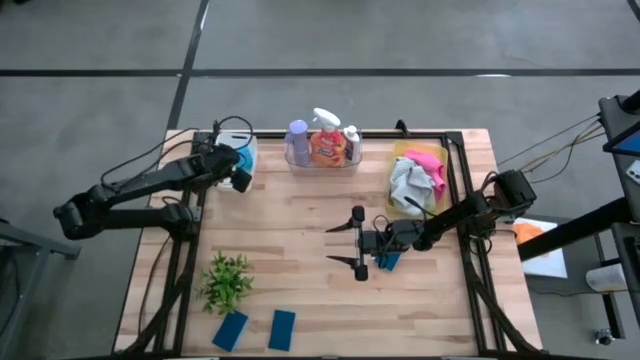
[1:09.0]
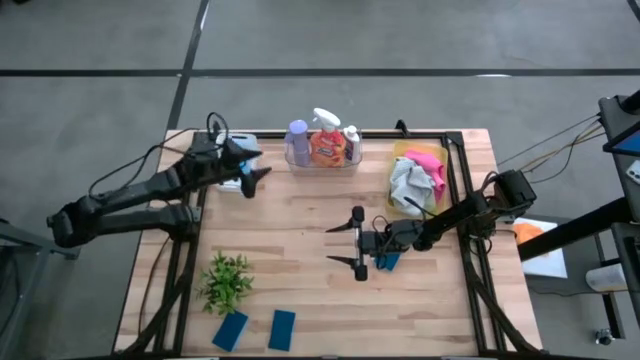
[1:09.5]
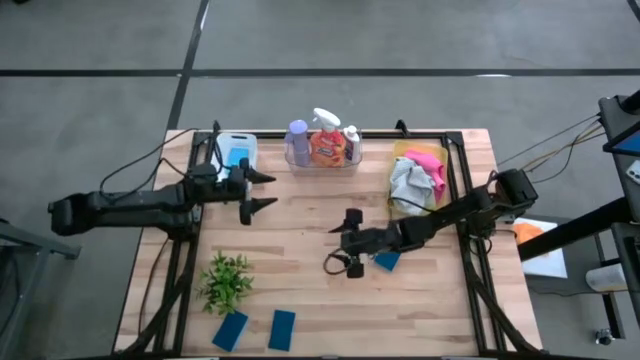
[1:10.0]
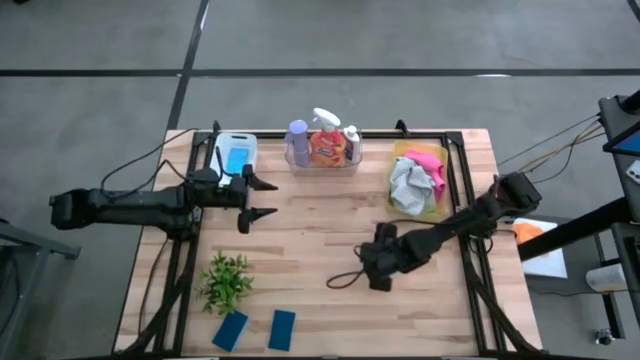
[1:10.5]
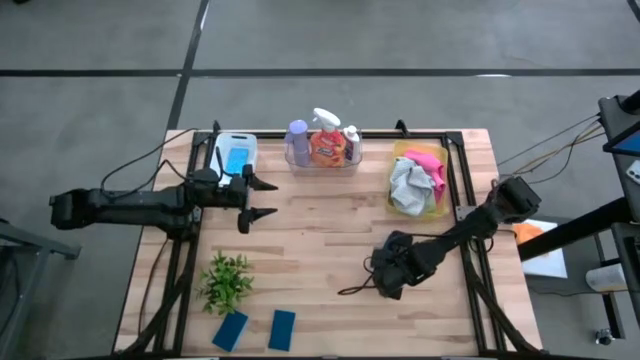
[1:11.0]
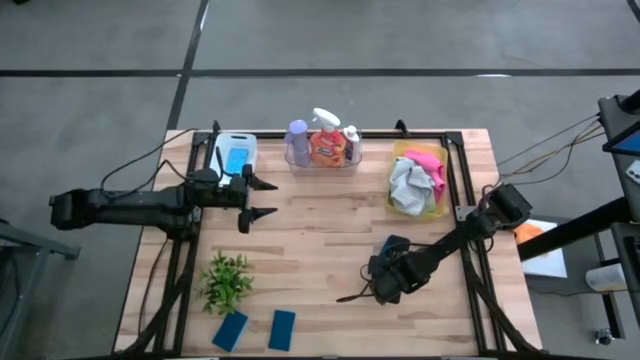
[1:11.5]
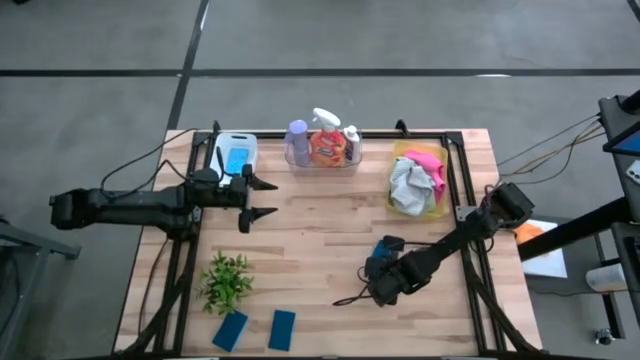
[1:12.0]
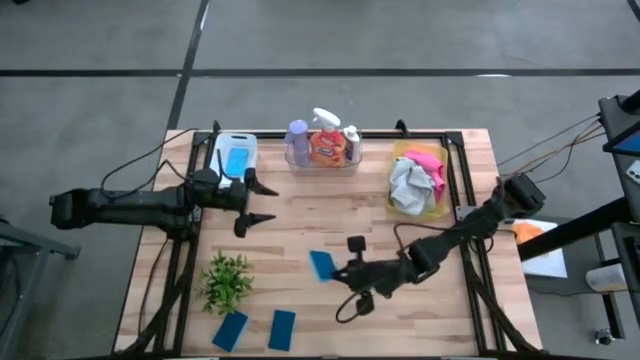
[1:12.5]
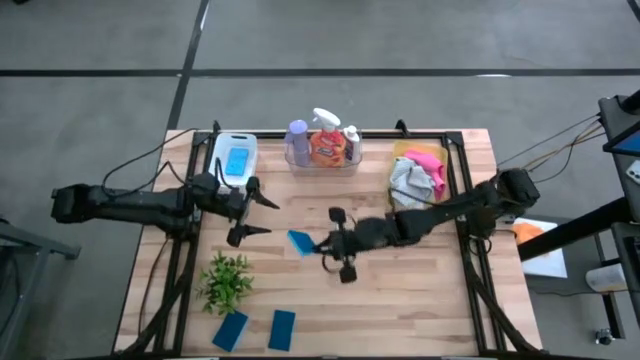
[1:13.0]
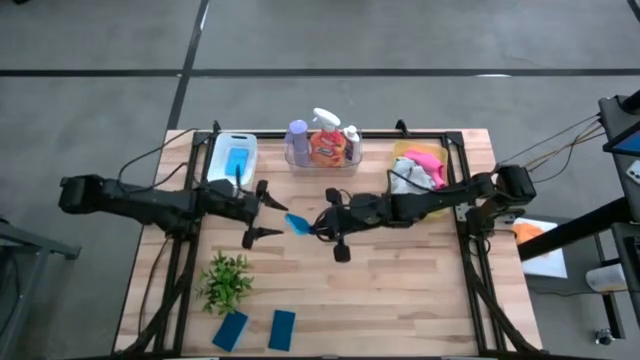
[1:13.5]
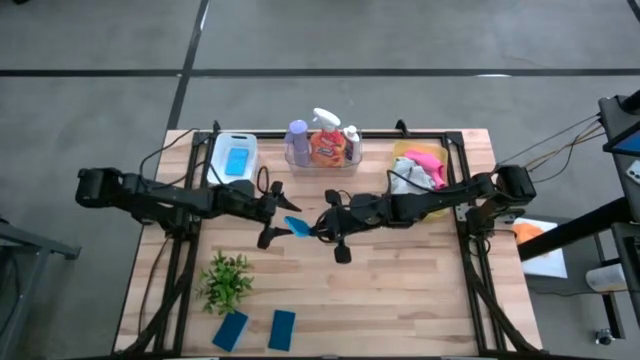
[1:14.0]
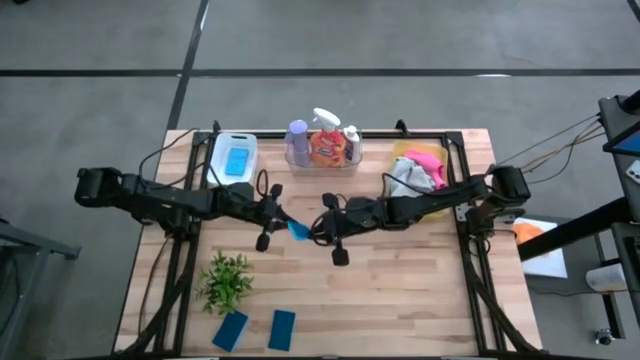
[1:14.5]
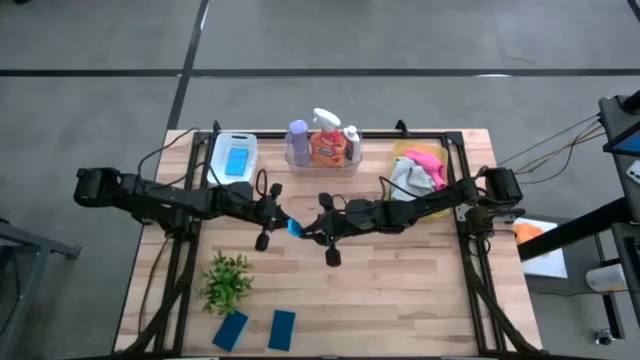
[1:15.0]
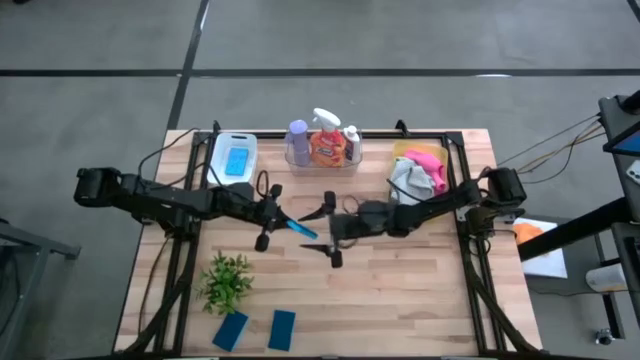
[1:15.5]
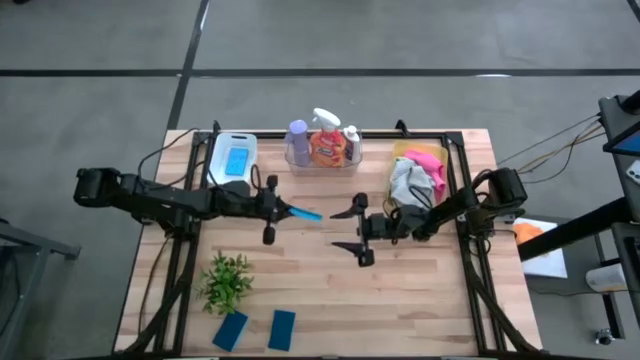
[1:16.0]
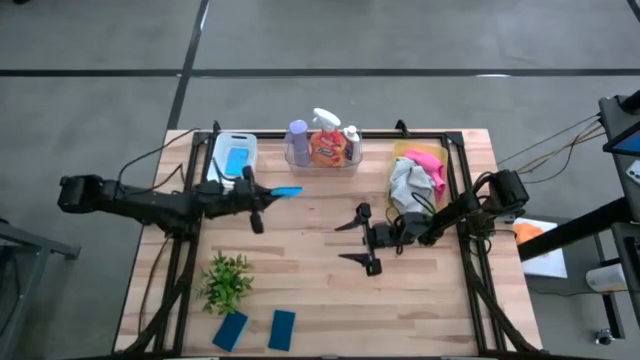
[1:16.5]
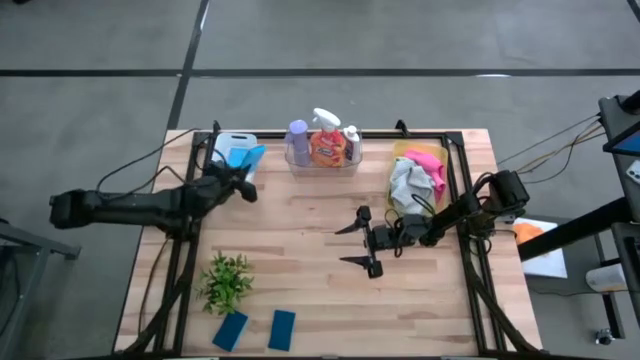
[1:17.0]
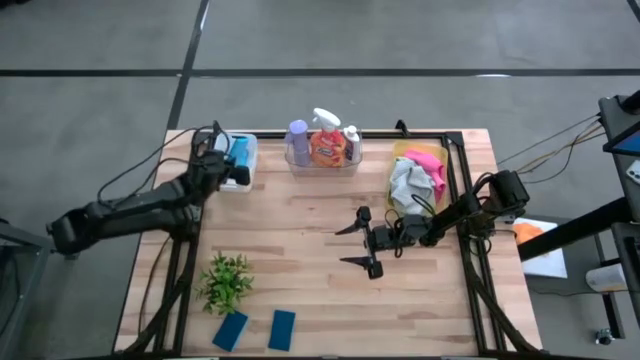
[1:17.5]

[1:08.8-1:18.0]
Task: Pick & Place Kitchen Items
Put the blue sponge into the white bin

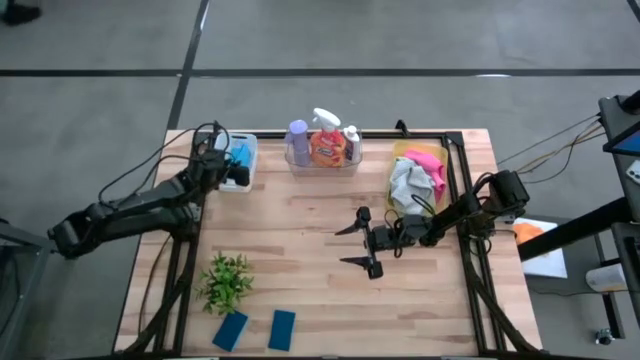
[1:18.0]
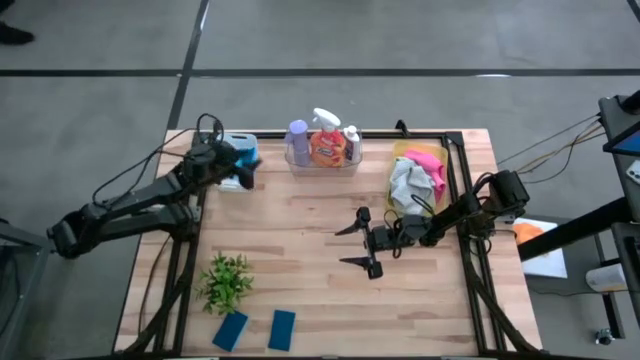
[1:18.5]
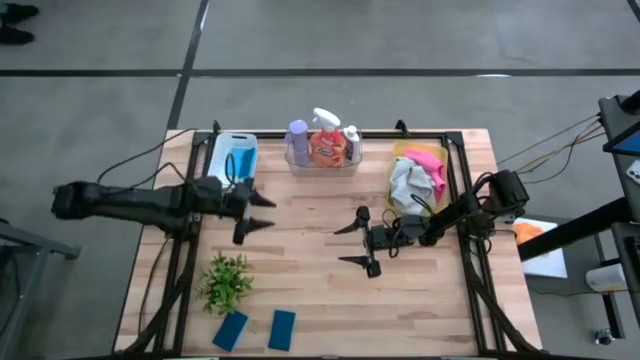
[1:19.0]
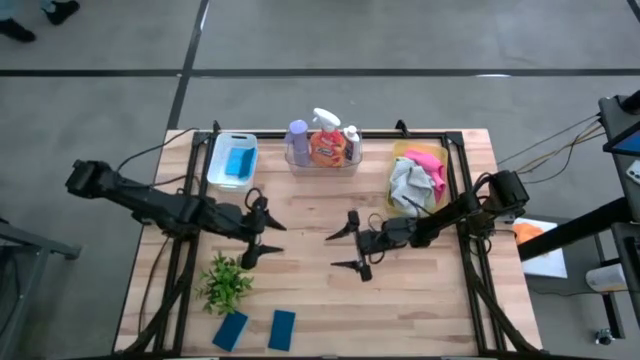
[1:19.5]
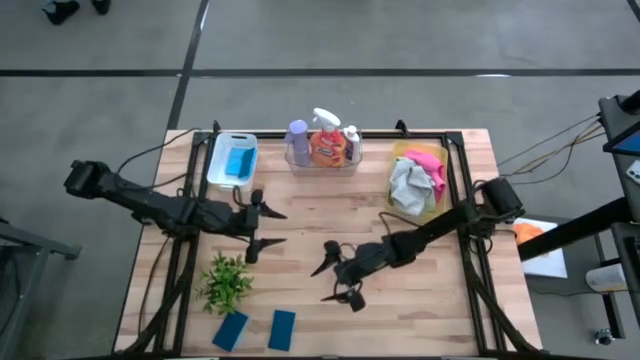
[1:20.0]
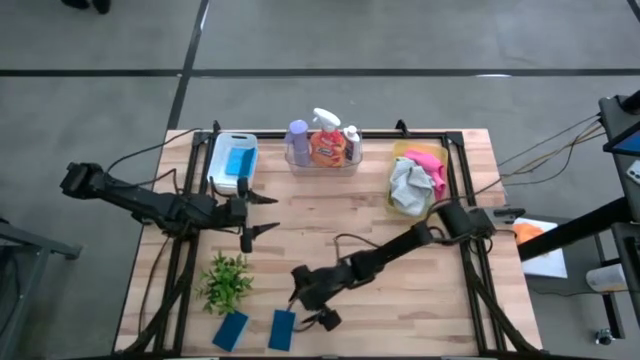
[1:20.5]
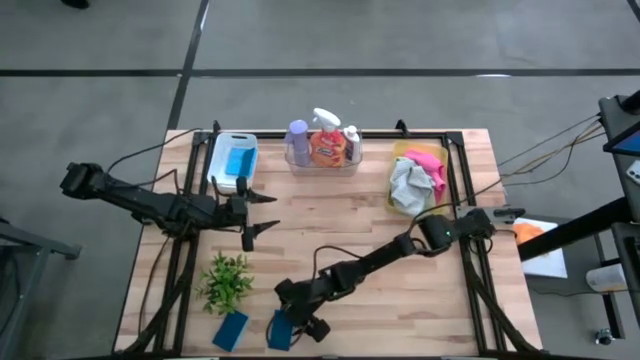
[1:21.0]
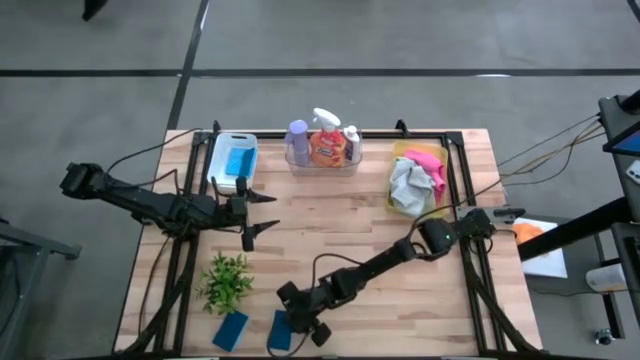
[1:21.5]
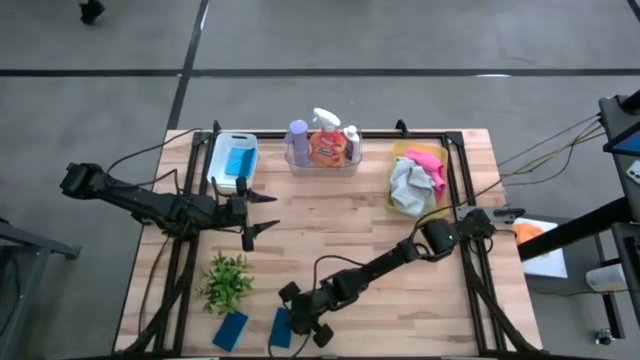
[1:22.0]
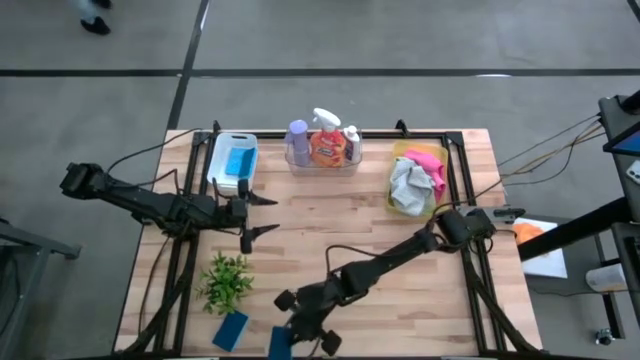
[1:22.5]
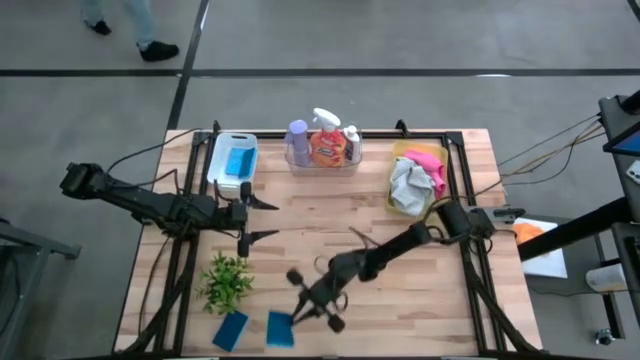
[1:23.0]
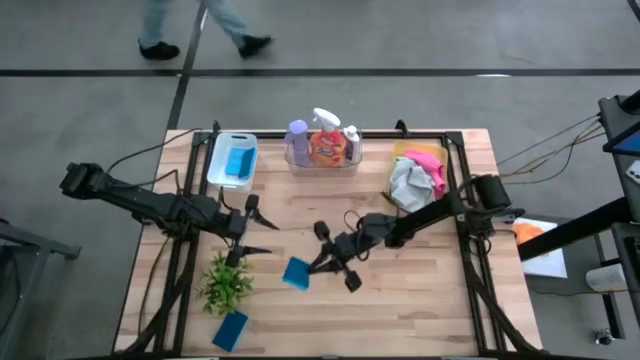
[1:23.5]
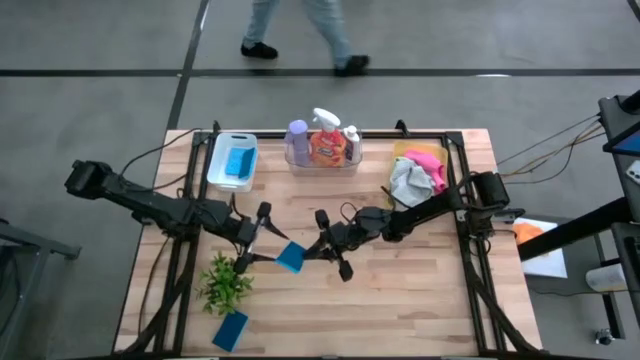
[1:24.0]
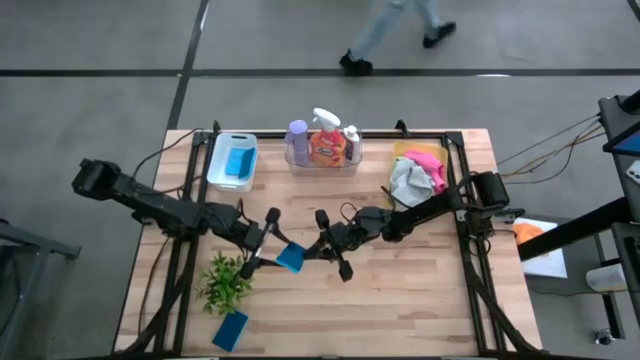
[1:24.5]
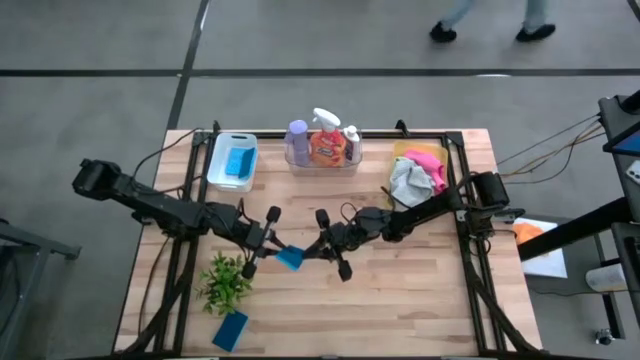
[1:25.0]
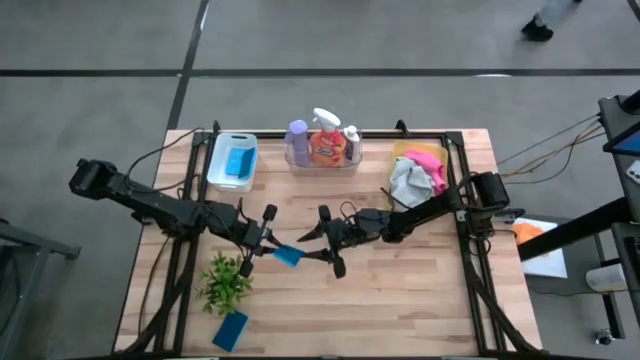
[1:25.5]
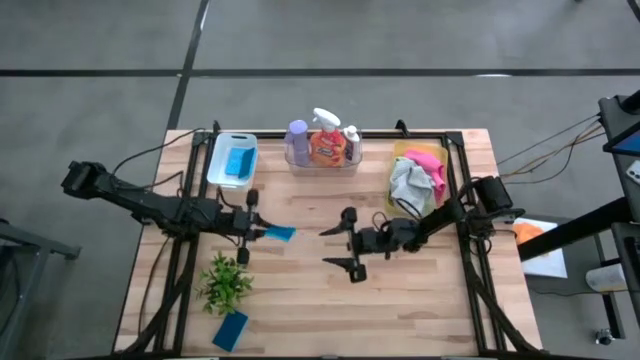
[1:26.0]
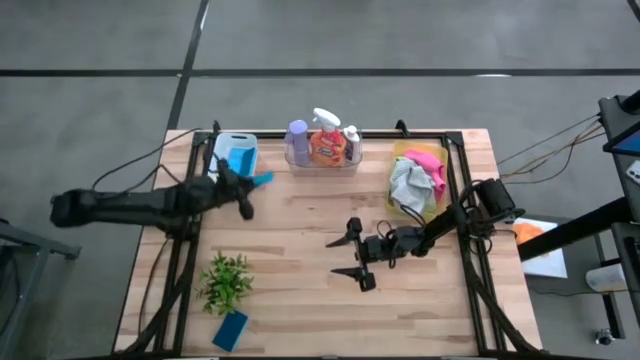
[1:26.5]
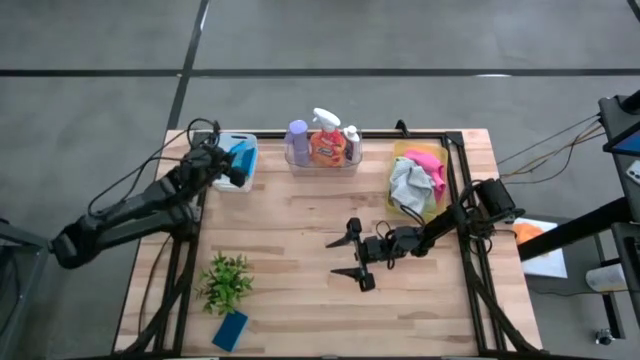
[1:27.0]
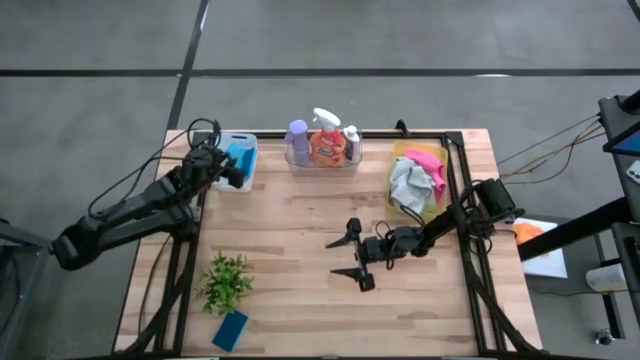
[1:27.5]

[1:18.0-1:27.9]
Put the blue sponge into the white bin
